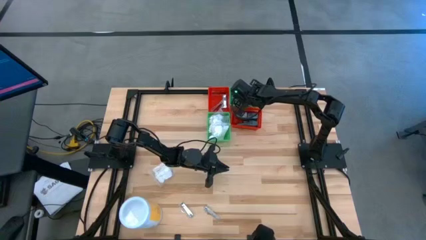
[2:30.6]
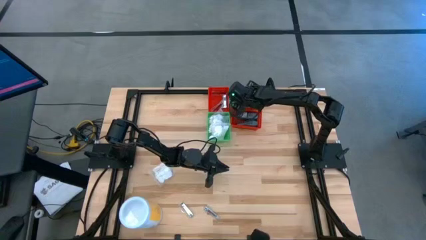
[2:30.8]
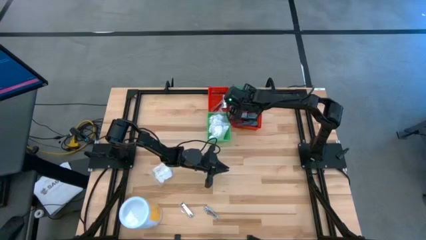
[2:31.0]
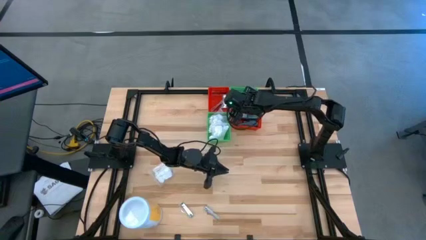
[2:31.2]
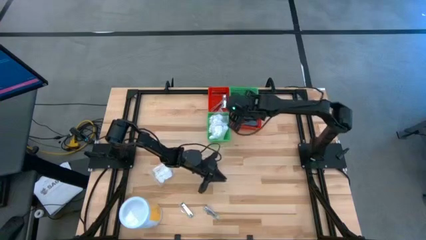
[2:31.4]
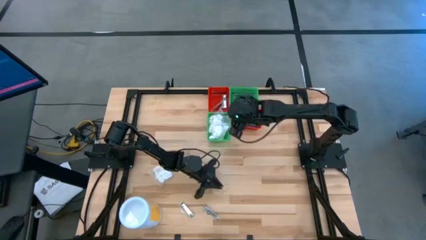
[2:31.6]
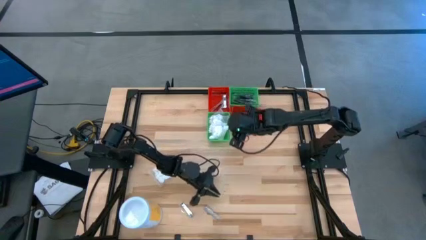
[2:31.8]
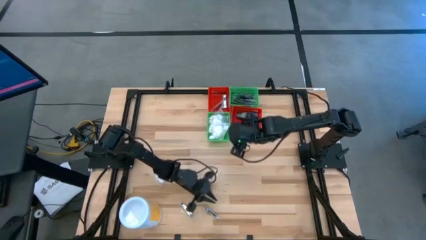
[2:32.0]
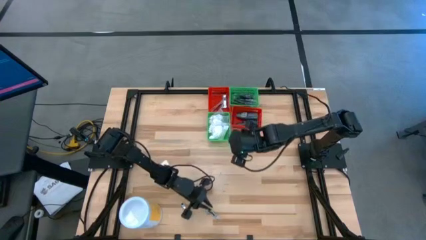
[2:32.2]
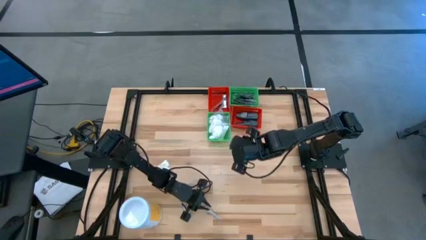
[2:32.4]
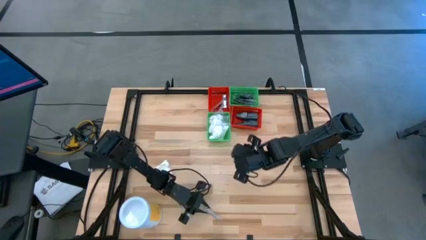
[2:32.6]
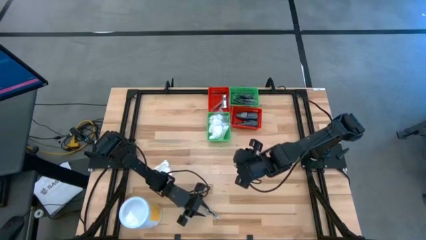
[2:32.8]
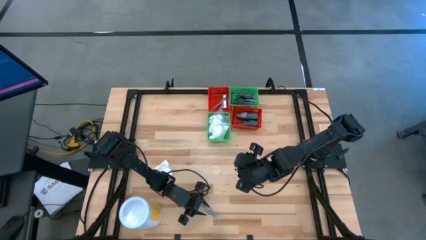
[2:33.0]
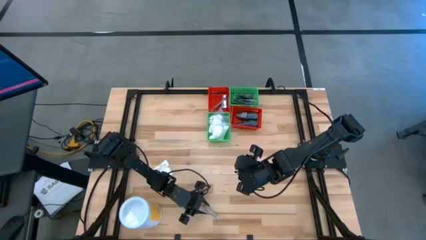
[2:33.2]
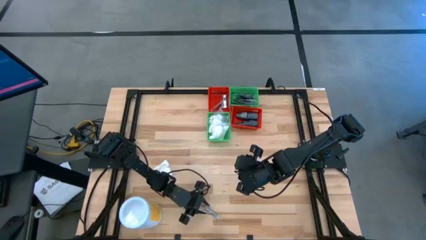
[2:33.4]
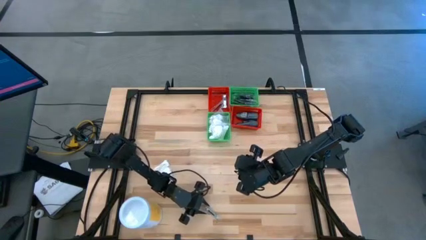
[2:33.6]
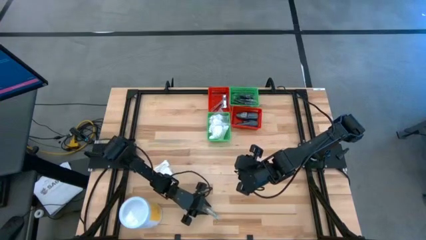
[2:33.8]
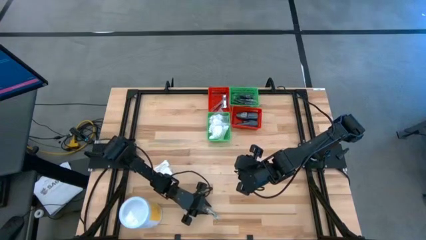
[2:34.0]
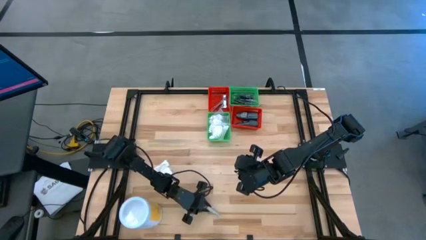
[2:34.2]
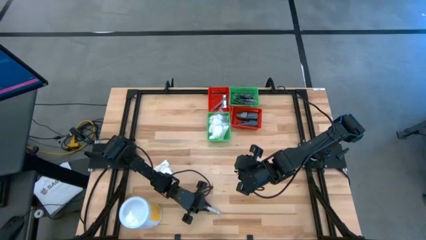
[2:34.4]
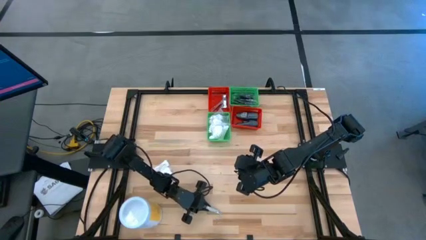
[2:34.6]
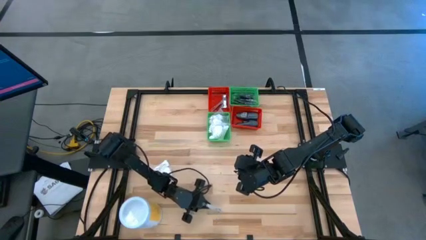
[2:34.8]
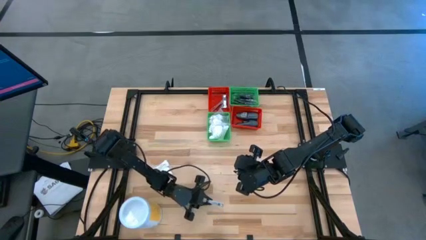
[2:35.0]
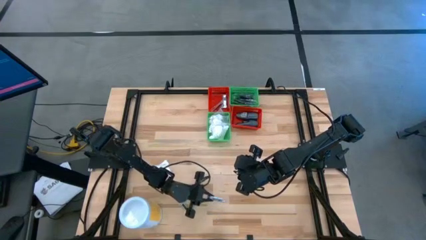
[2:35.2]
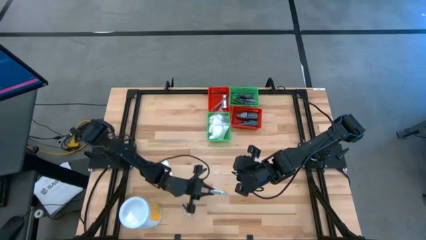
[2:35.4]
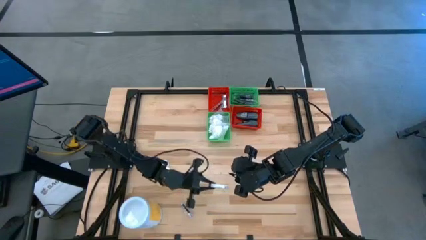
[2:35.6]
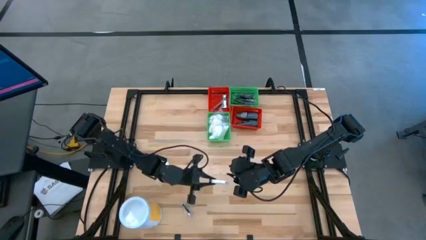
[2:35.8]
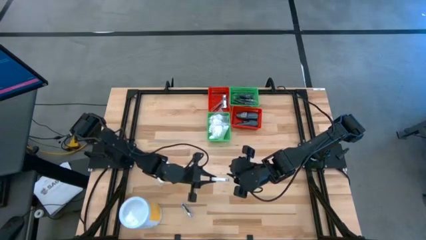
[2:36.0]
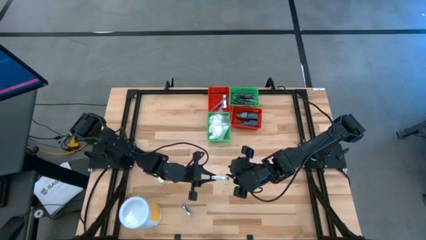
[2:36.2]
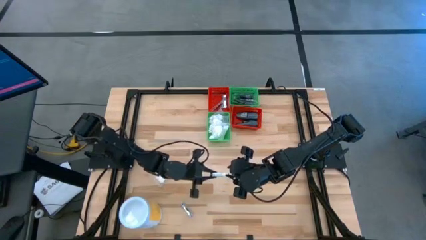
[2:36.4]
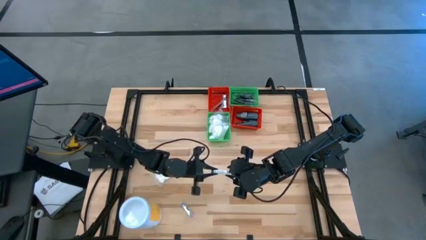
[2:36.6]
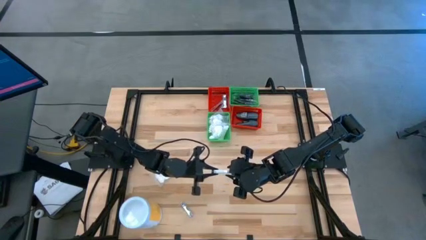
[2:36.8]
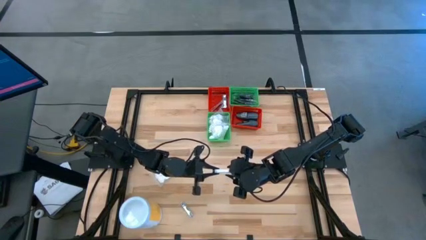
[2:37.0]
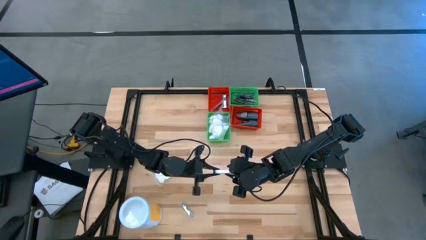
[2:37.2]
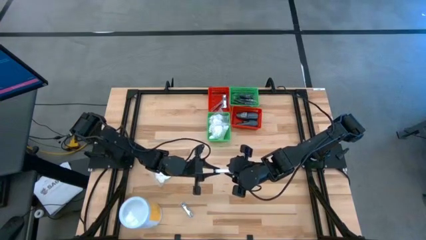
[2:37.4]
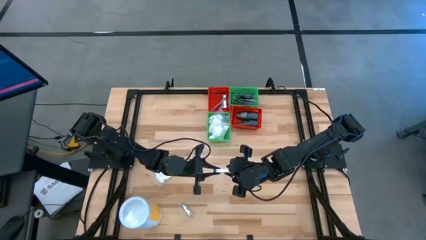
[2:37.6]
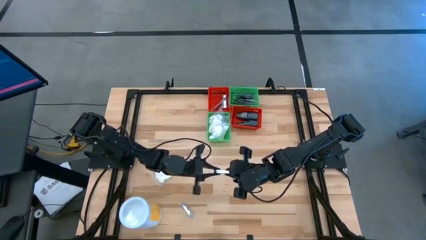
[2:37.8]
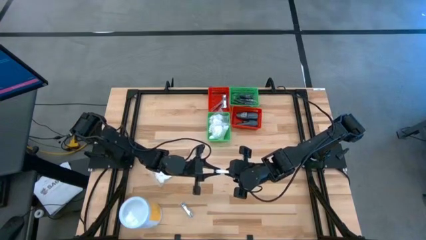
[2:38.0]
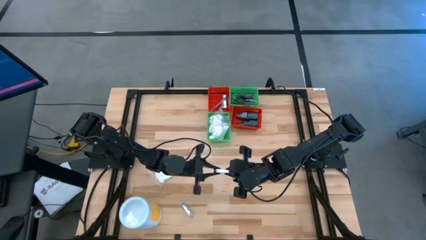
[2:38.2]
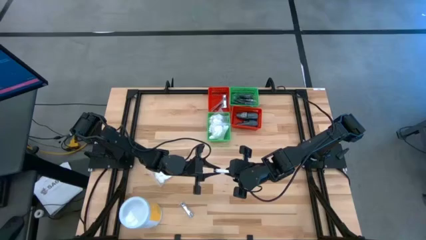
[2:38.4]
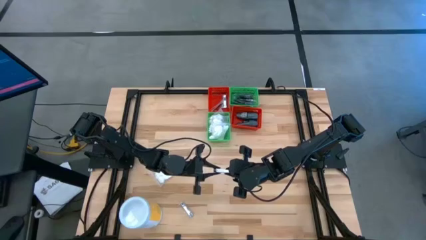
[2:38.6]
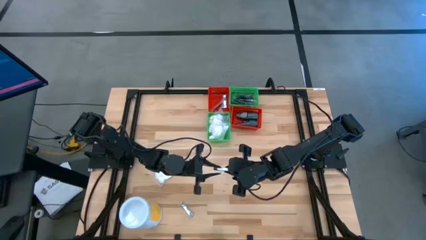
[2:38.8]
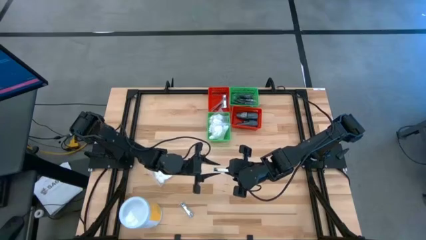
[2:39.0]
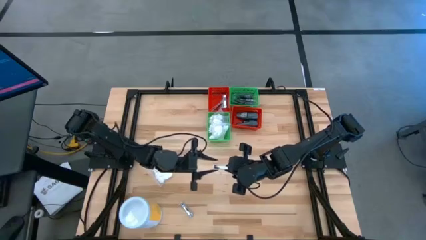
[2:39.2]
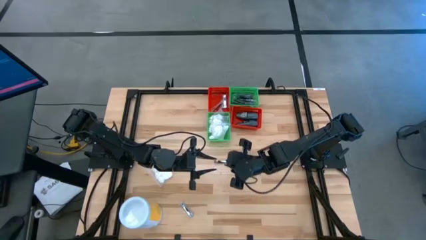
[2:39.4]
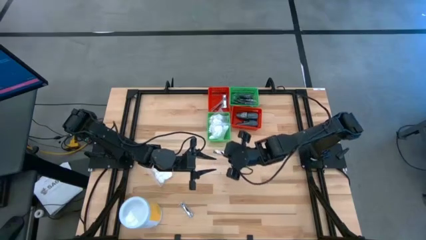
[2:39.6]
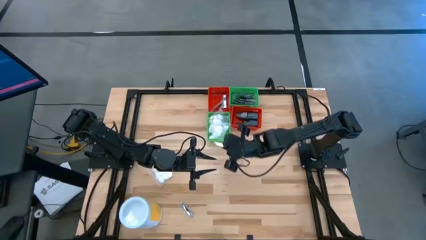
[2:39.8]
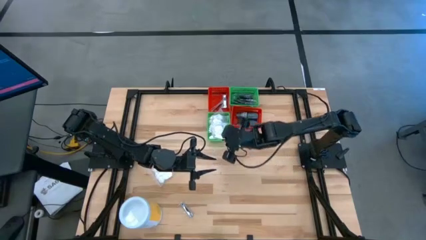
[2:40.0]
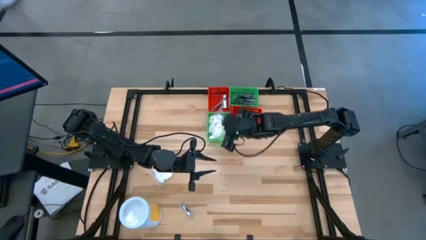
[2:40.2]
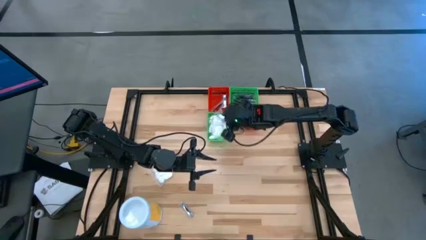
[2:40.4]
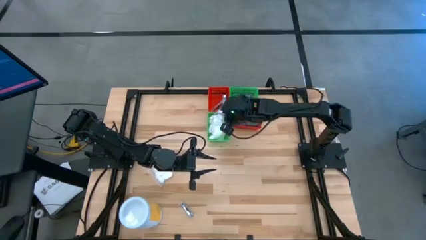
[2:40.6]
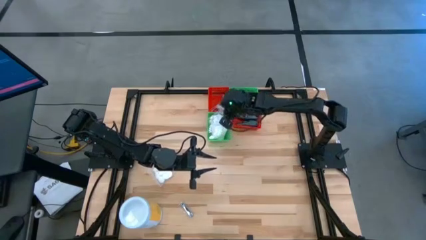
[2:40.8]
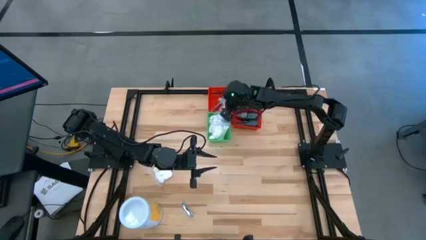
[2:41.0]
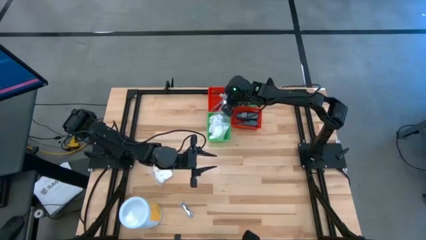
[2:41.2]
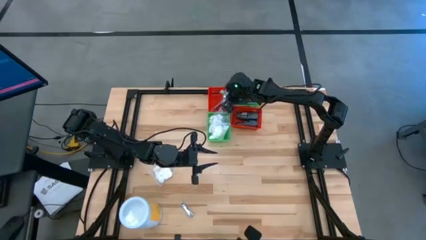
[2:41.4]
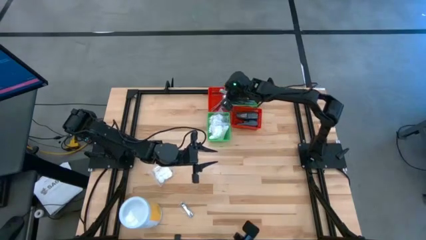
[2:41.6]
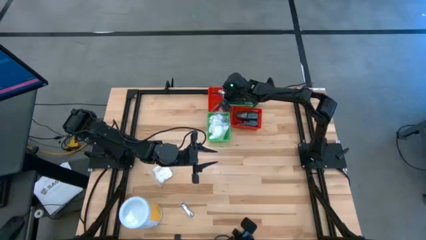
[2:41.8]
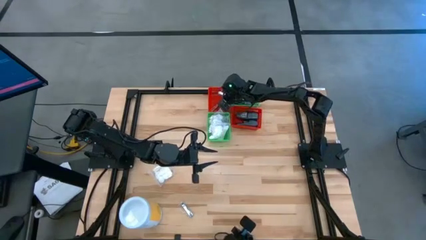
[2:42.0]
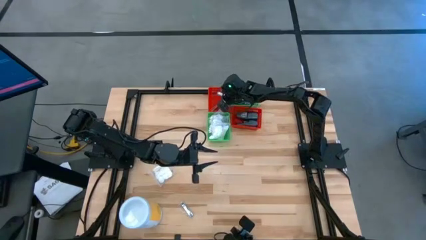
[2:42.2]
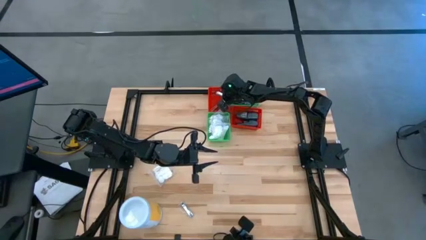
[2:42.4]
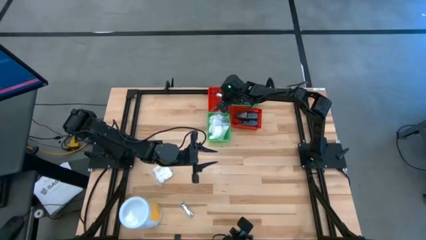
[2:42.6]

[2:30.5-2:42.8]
Task: Pick & Place Travel size toiletries
Put the nail cutter into the left red bin
